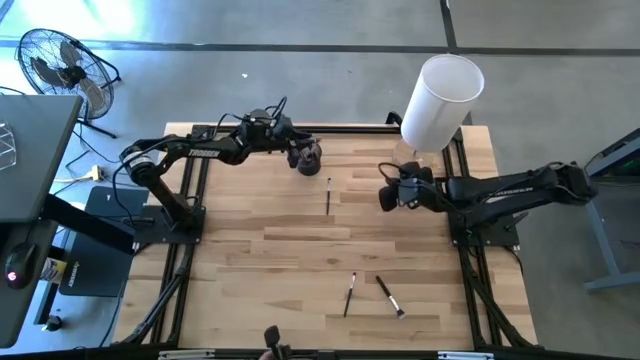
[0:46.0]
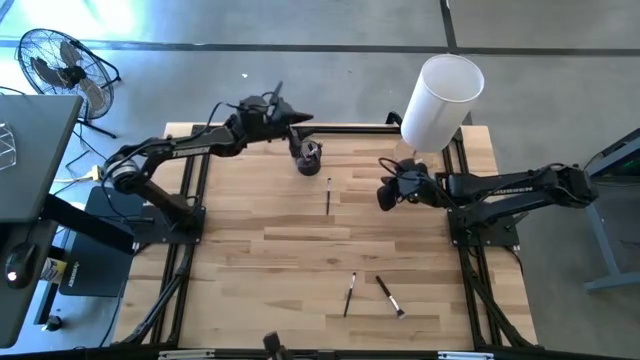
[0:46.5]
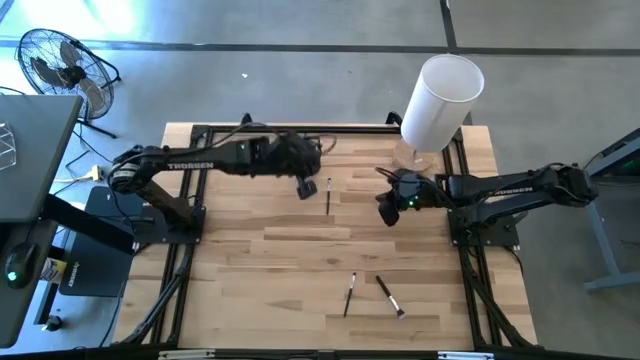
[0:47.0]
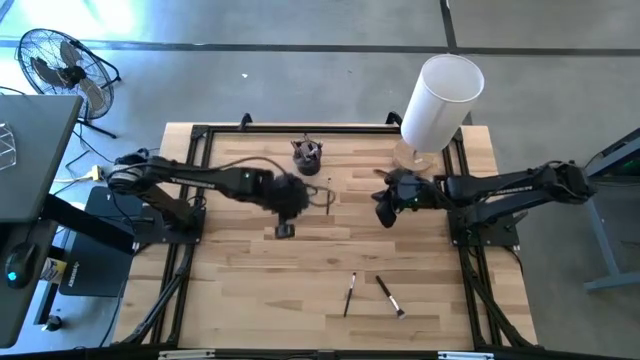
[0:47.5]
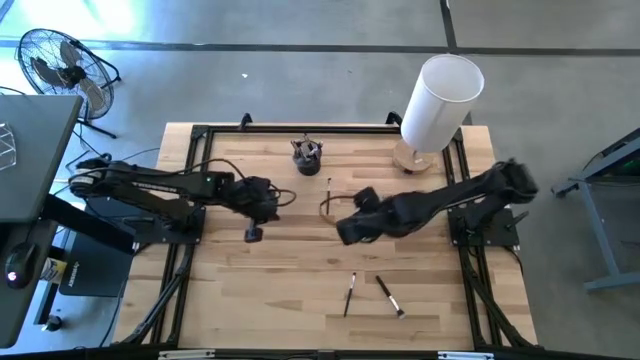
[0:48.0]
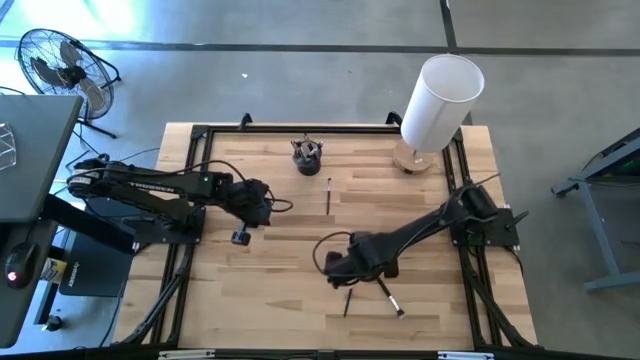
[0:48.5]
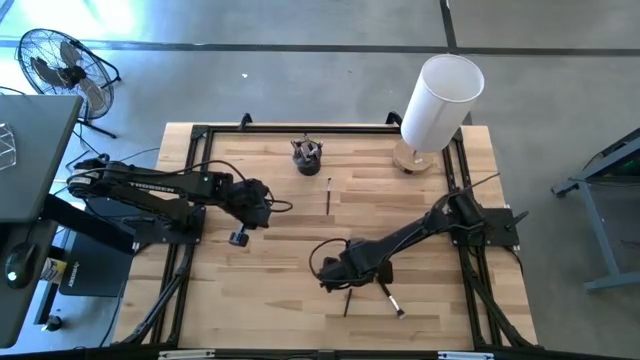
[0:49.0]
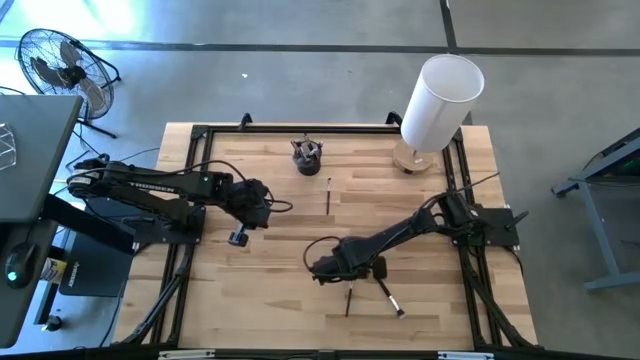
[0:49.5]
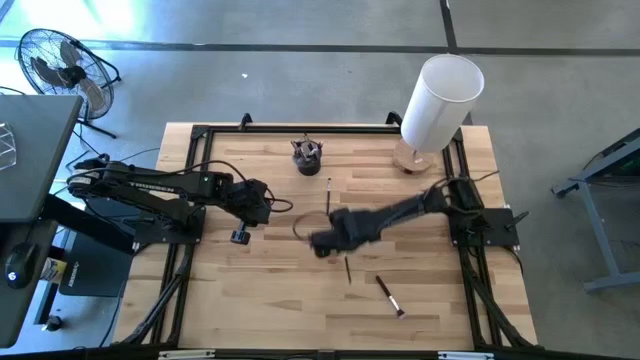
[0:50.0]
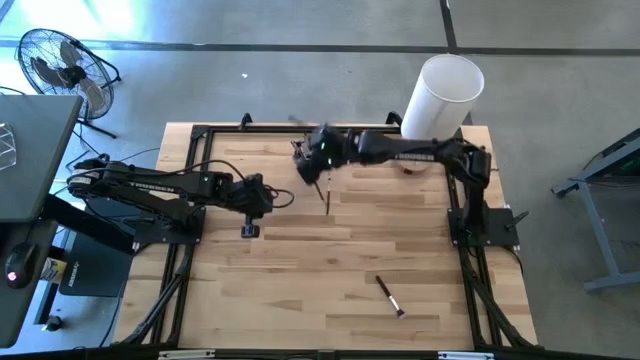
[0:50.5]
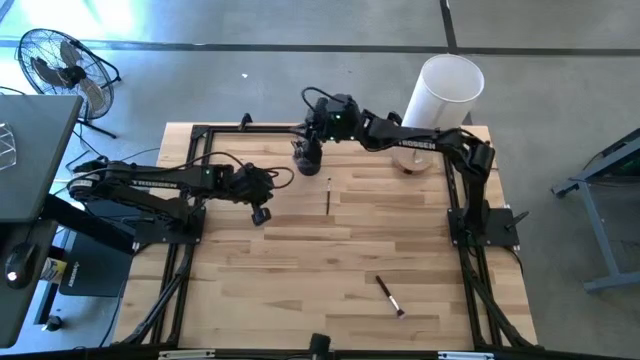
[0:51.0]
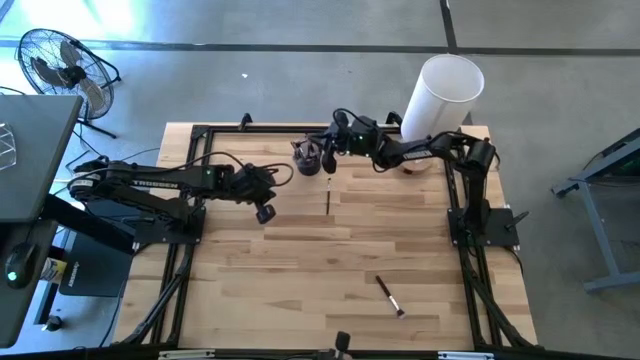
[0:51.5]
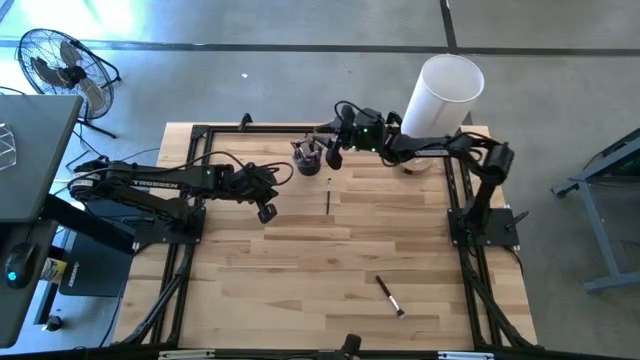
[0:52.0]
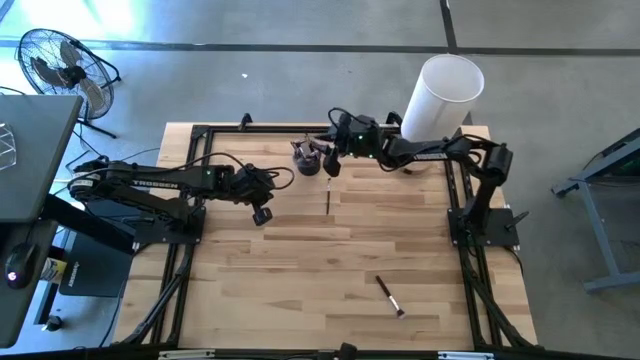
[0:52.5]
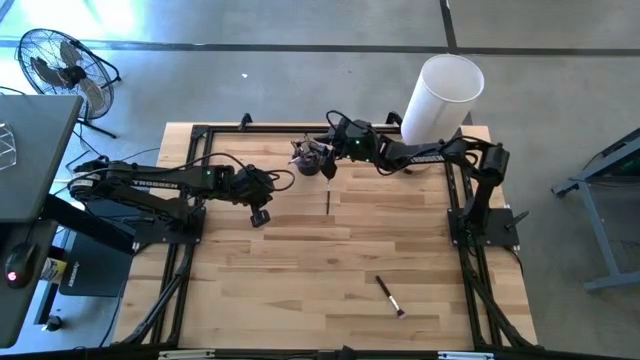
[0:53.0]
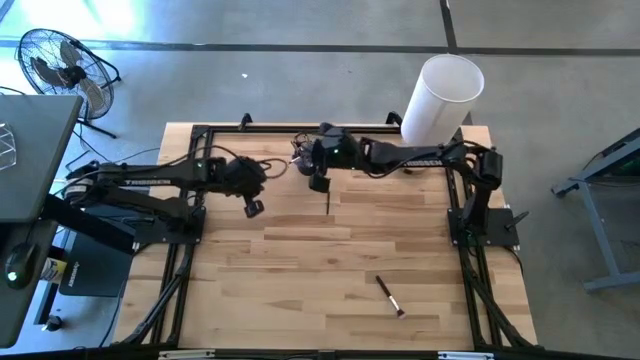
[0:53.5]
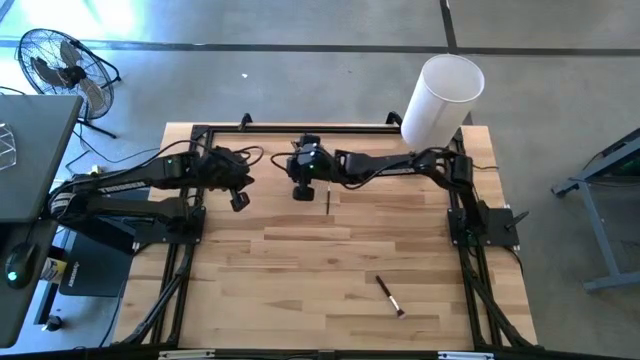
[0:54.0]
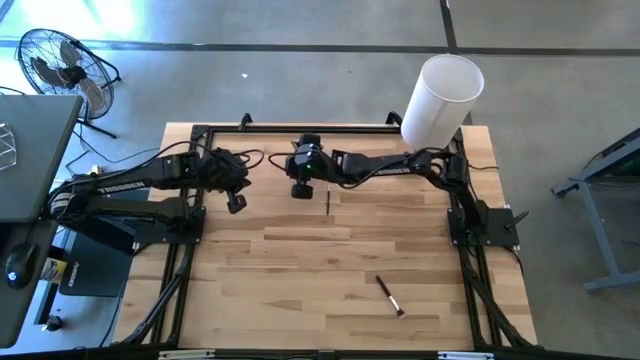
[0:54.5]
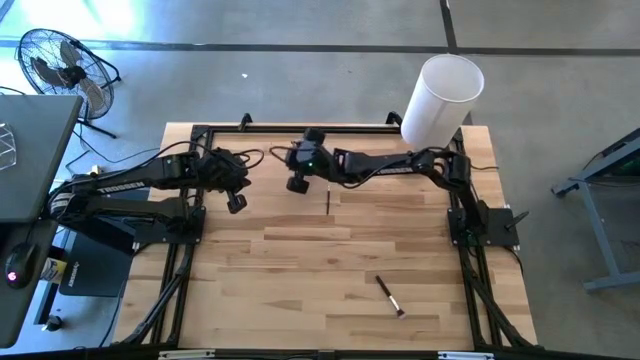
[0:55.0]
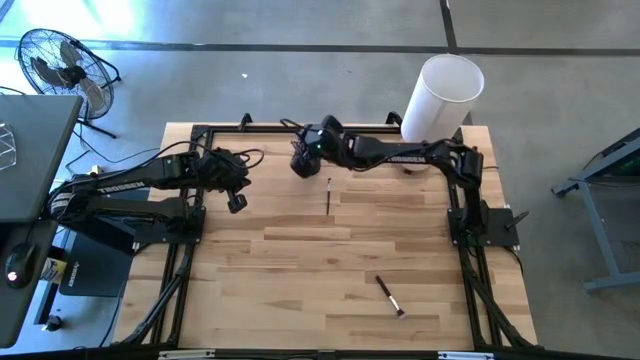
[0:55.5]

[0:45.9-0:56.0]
Task: Put items in baskets/containers
Put the eyeshadow brush into the pen holder

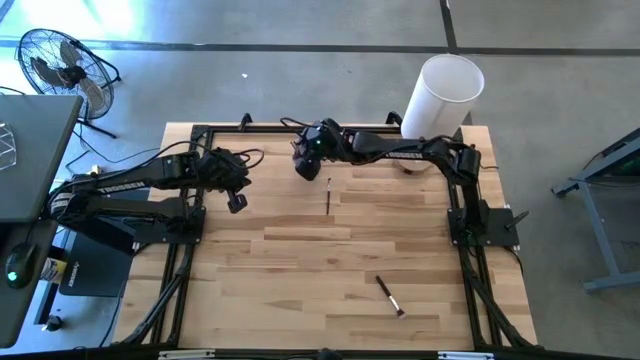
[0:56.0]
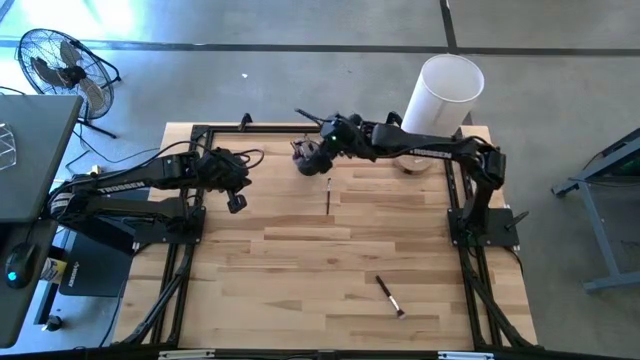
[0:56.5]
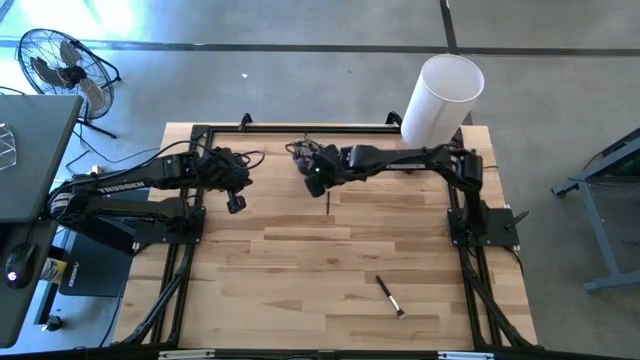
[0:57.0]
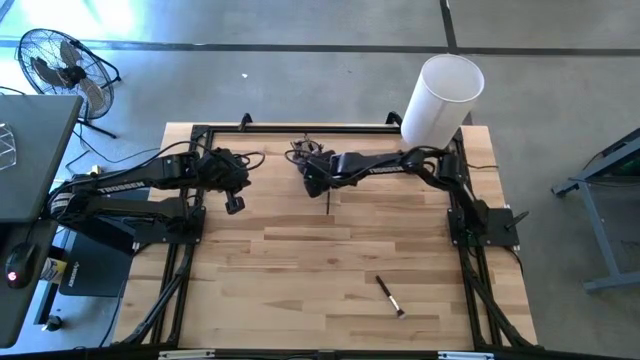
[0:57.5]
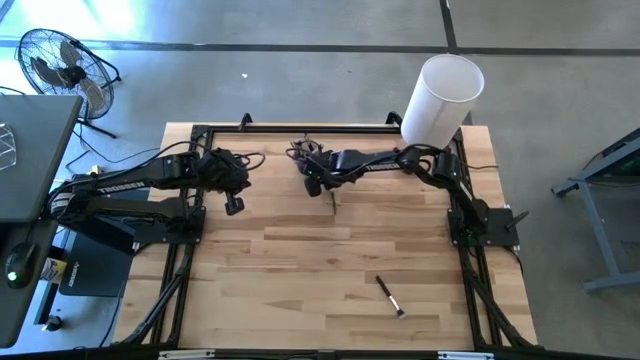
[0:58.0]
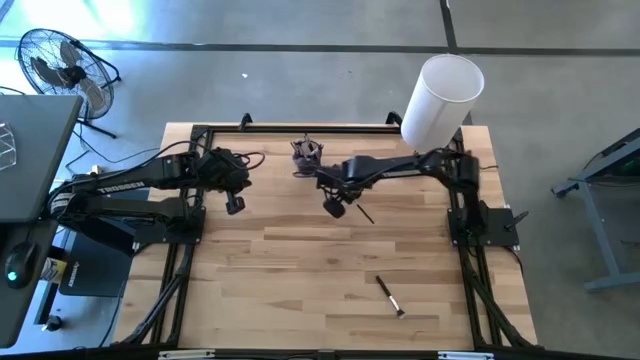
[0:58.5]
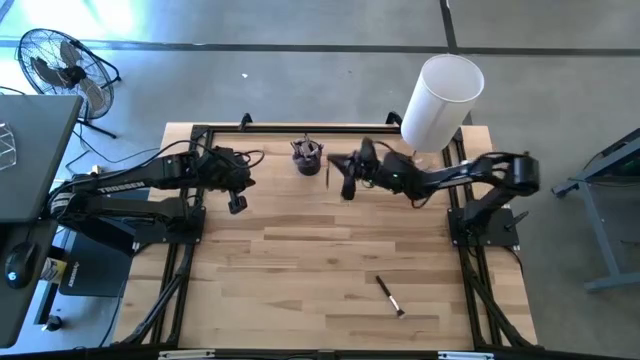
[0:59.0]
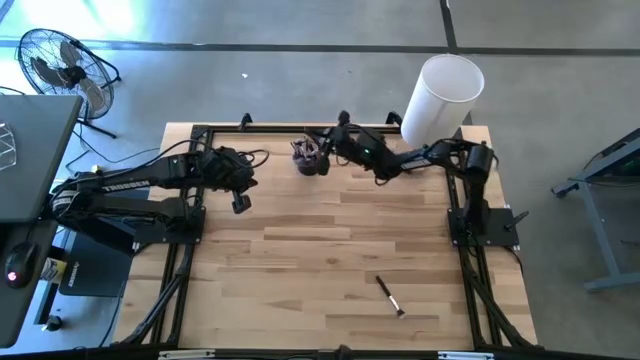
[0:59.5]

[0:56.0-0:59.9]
Put the eyeshadow brush into the pen holder

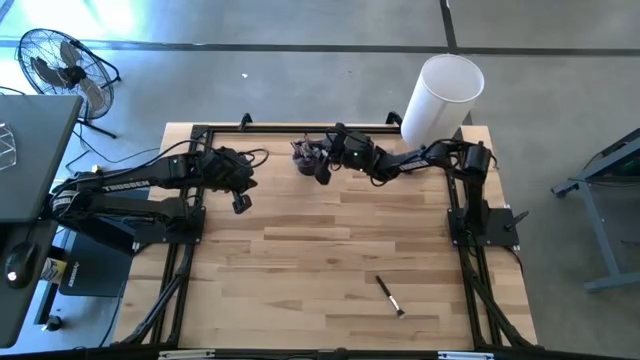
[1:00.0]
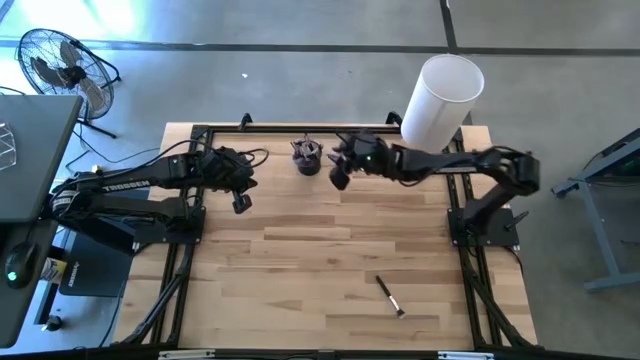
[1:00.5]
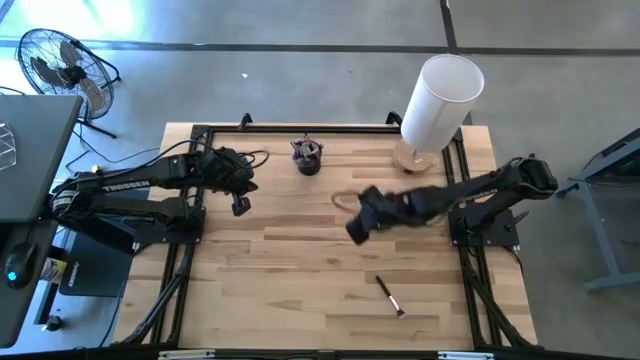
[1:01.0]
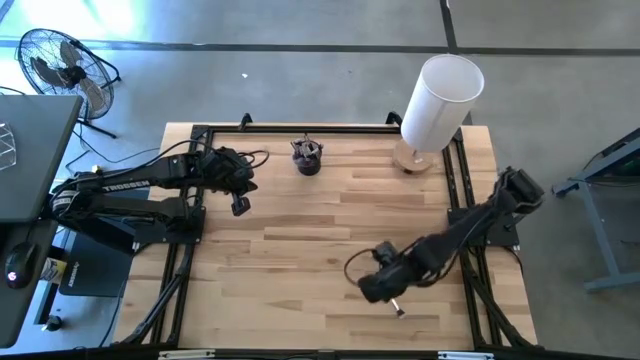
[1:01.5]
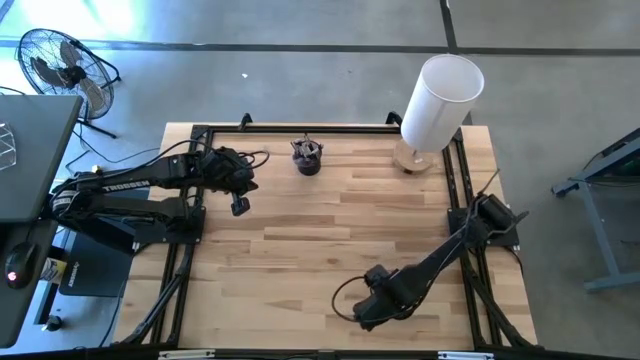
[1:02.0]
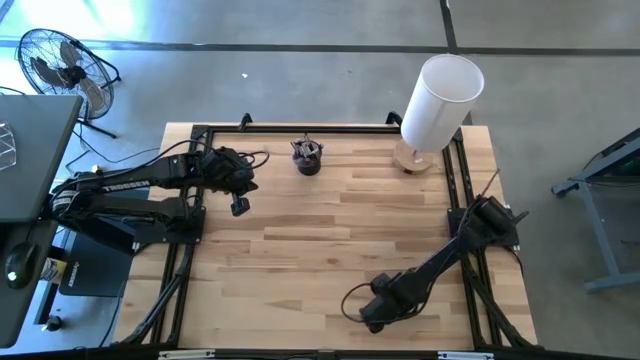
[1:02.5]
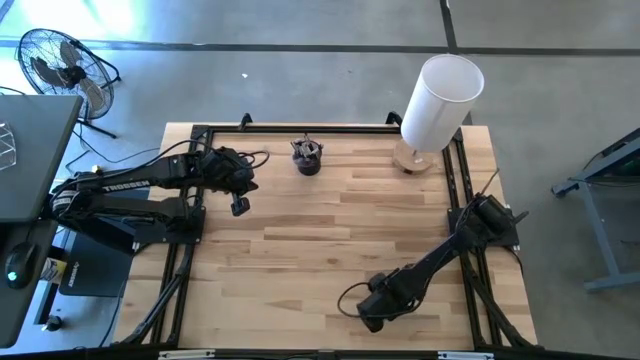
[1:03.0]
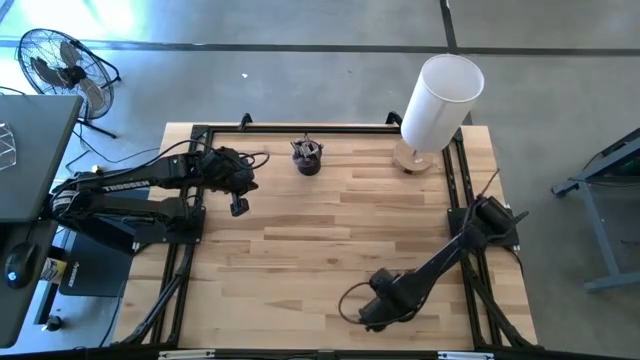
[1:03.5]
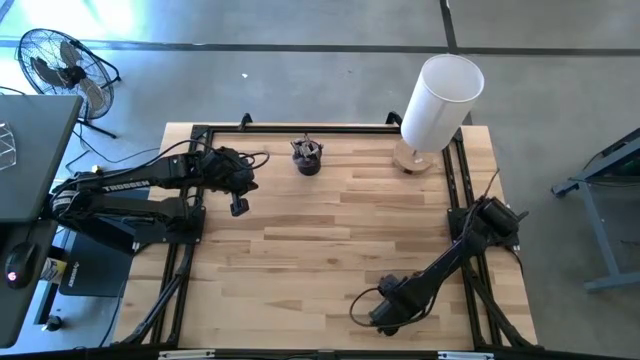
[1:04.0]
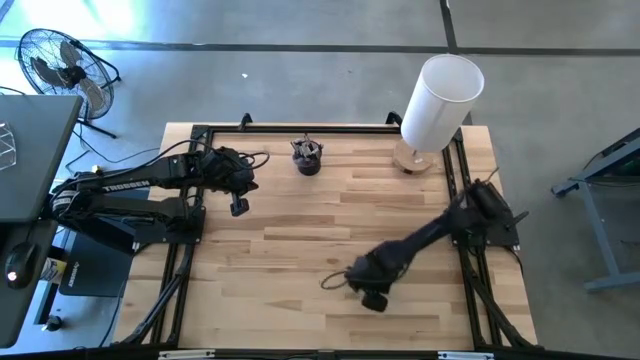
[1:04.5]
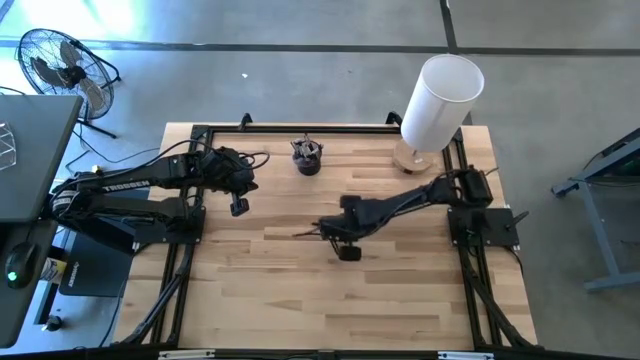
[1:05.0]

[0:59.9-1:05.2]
Put the blush brush into the pen holder

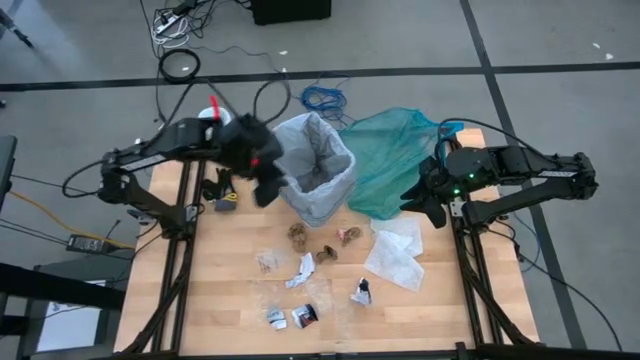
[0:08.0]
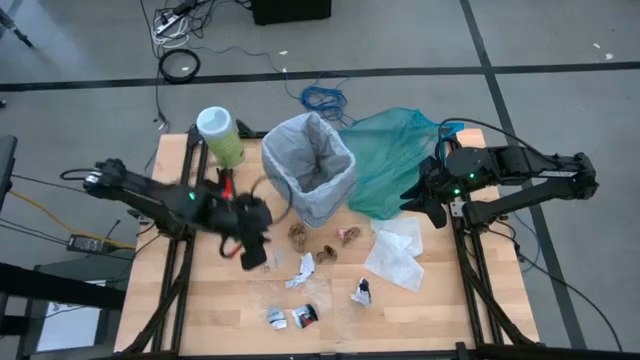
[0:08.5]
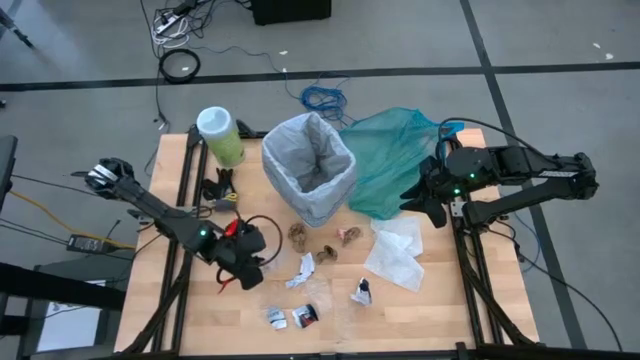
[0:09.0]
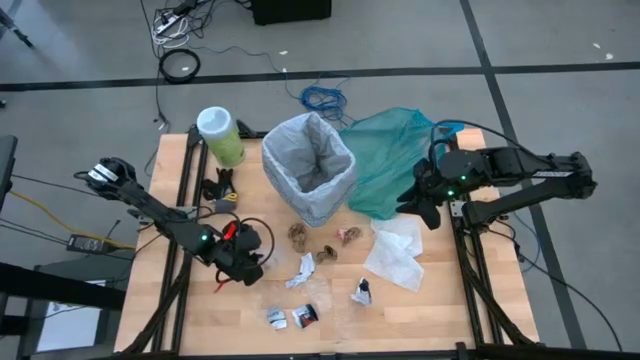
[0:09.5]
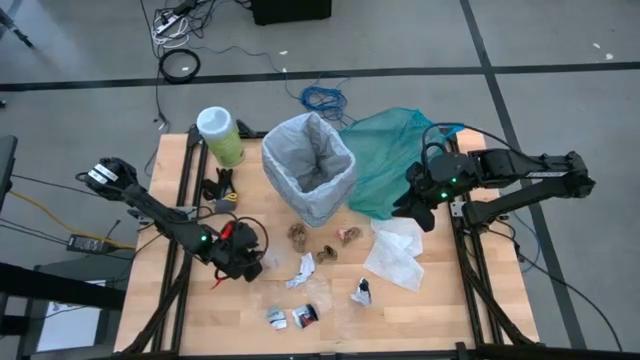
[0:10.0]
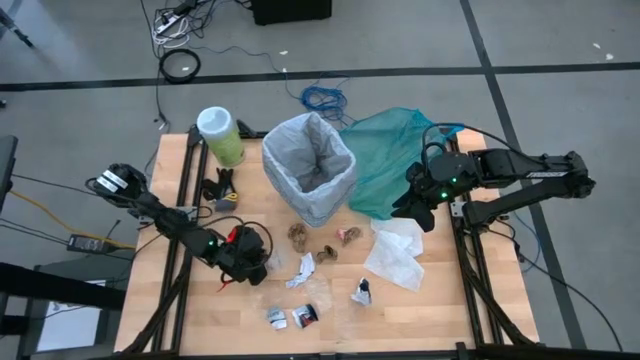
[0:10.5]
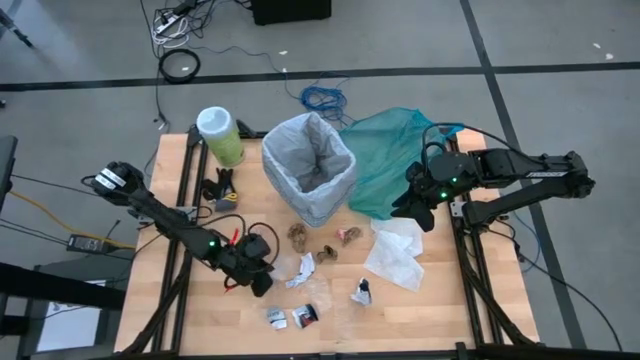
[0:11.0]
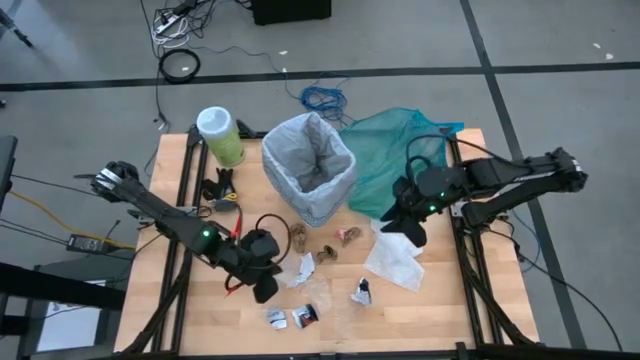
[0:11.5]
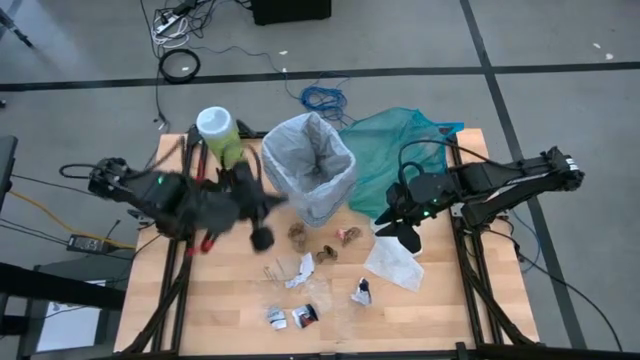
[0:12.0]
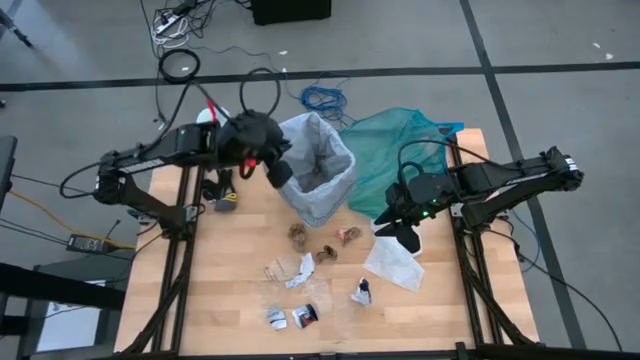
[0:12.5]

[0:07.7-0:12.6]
Task: place trash/remove bag and relplace
Put the transparent plastic into the trash bin
